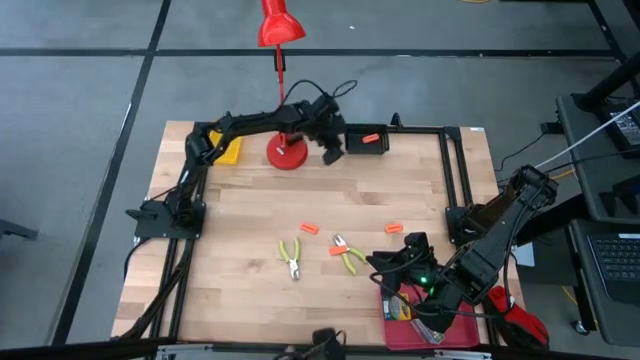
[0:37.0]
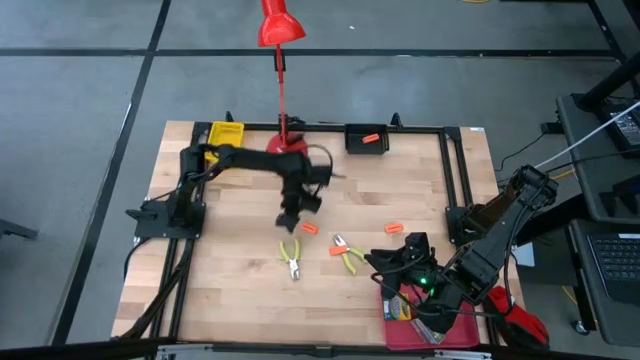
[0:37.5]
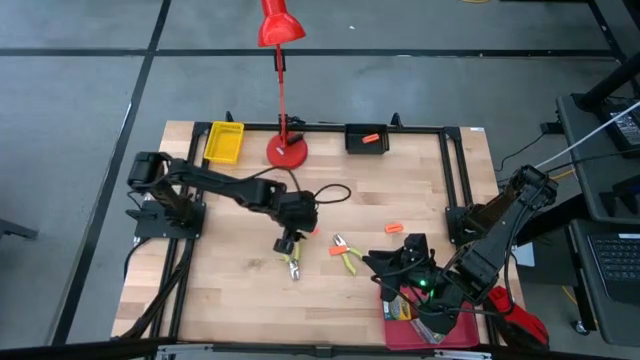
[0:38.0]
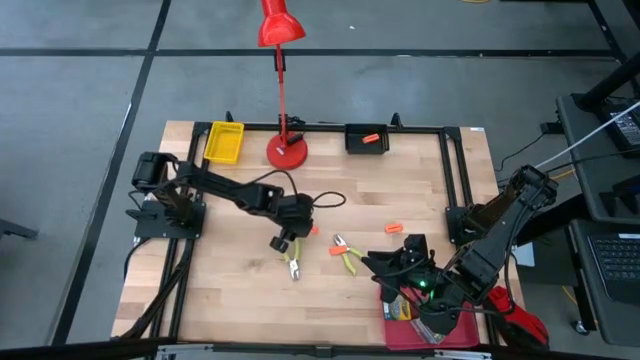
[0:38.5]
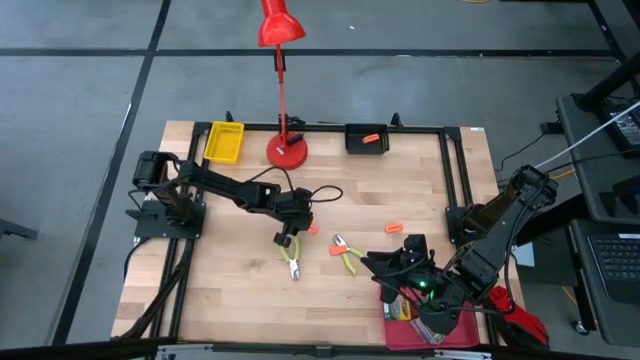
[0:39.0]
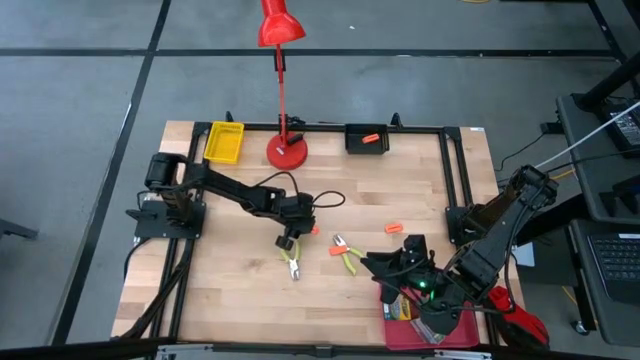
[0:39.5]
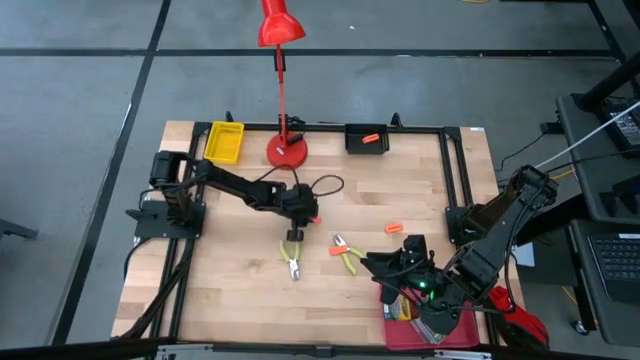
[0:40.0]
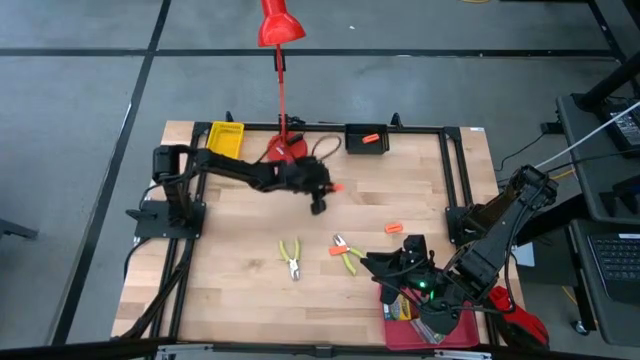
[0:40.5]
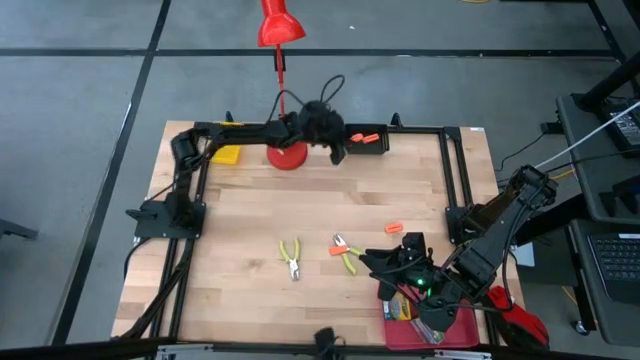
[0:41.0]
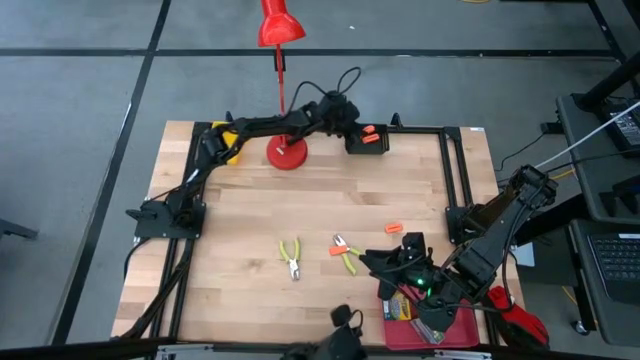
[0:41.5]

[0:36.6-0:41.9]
Task: Pick & Place School Supplies
Put the orange eraser into the black bin

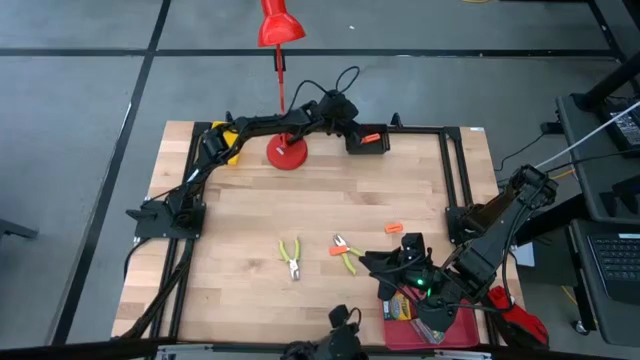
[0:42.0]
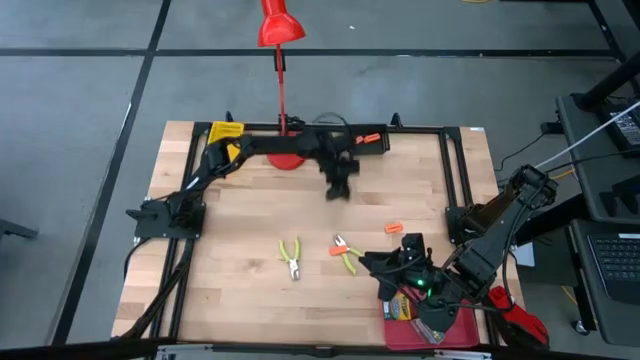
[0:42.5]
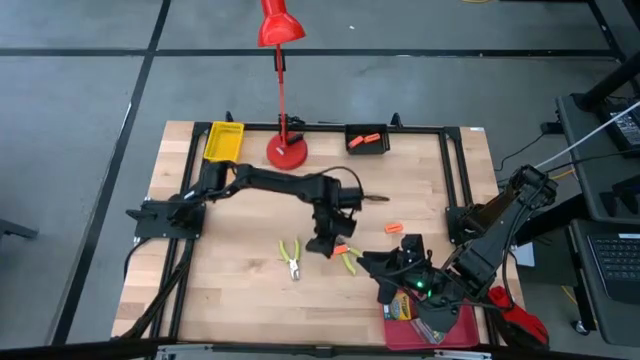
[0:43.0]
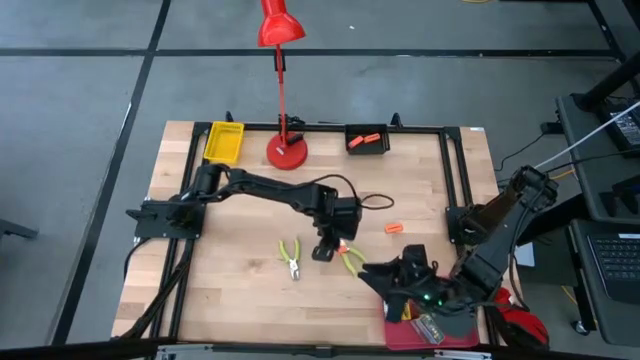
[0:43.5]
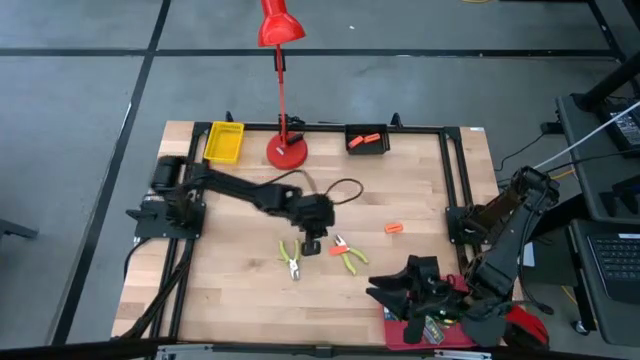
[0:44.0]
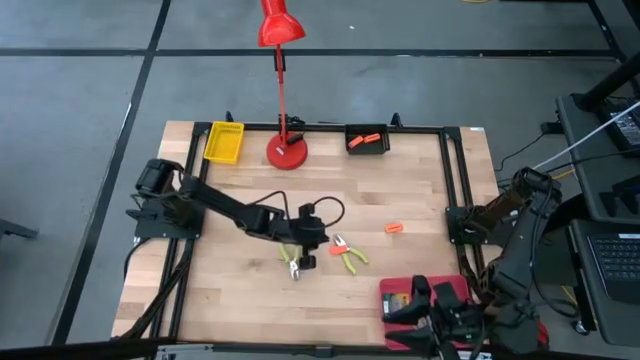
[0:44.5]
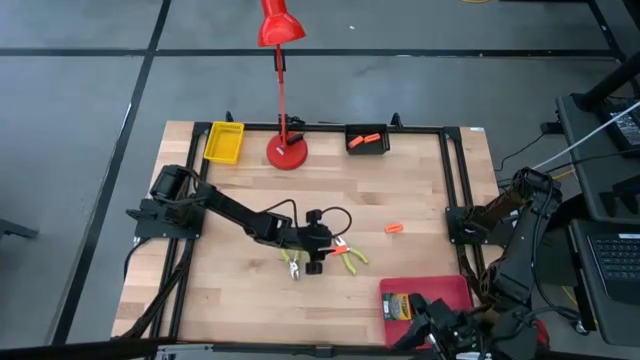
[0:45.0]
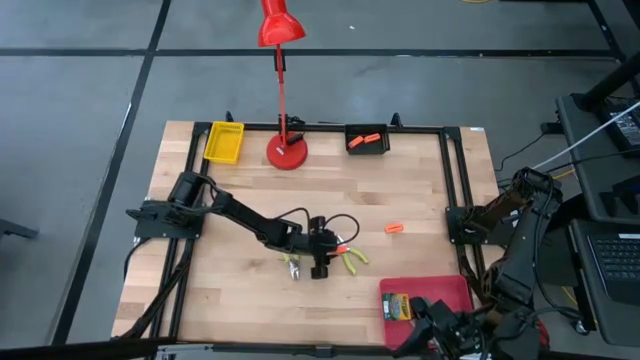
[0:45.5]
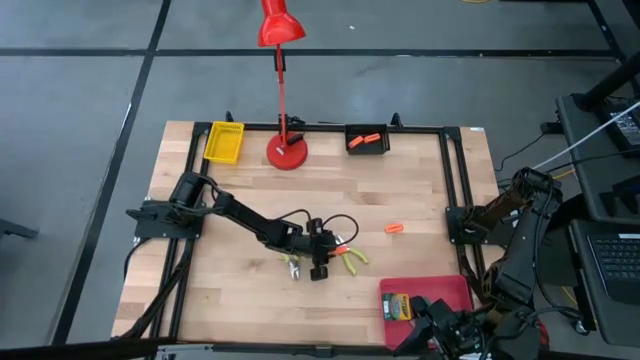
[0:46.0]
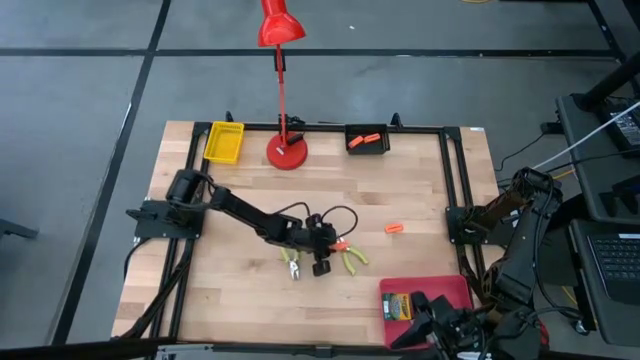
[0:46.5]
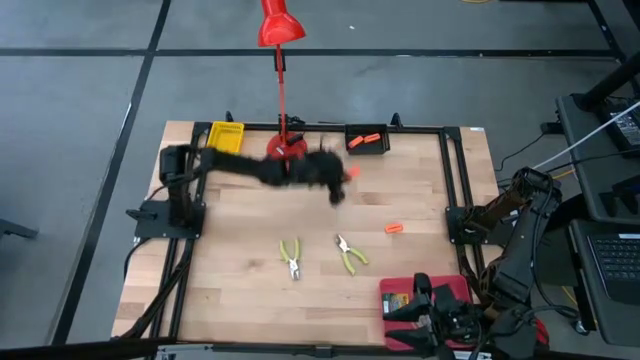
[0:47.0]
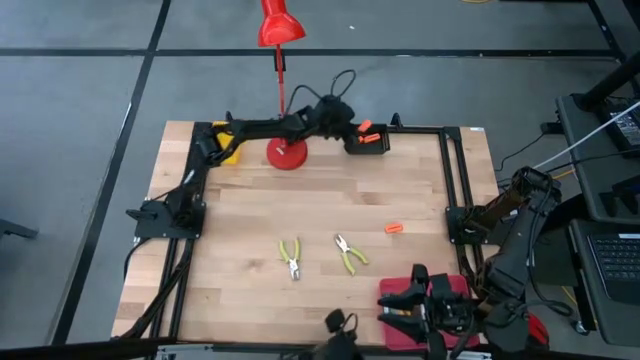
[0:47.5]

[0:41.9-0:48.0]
Put the orange eraser into the black bin

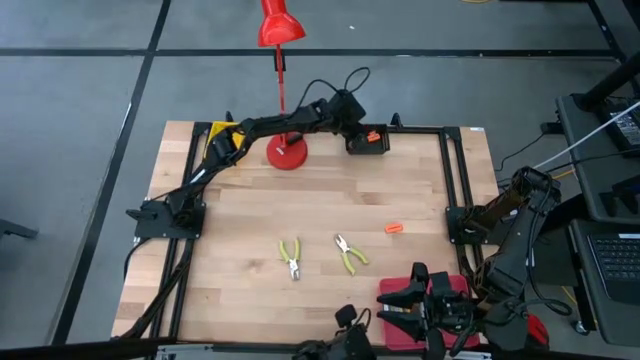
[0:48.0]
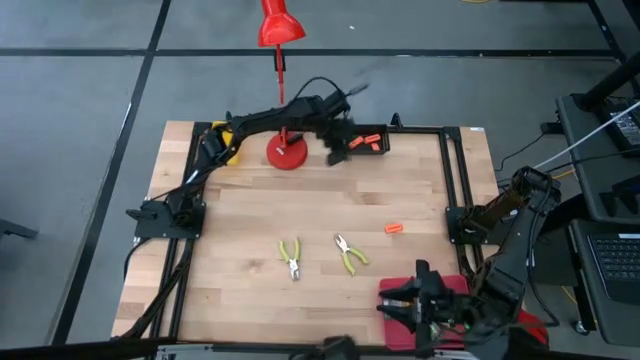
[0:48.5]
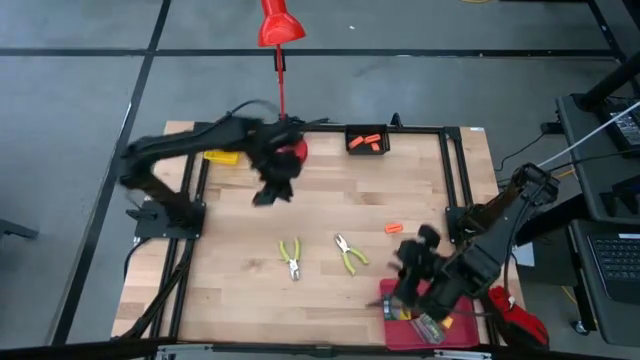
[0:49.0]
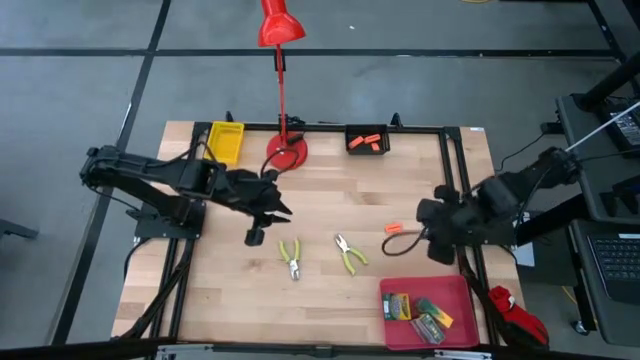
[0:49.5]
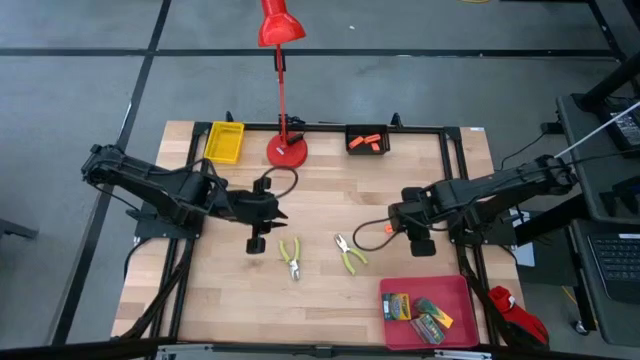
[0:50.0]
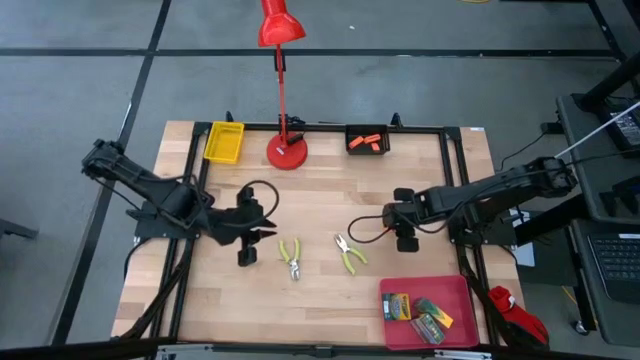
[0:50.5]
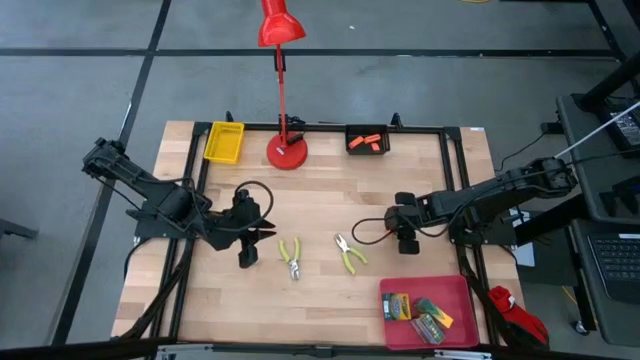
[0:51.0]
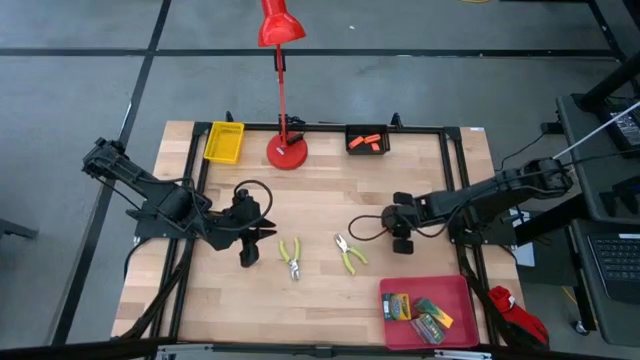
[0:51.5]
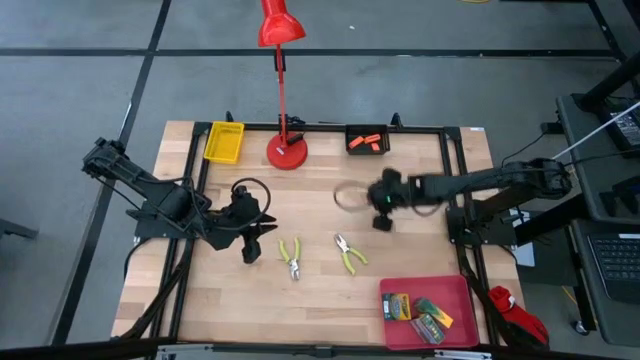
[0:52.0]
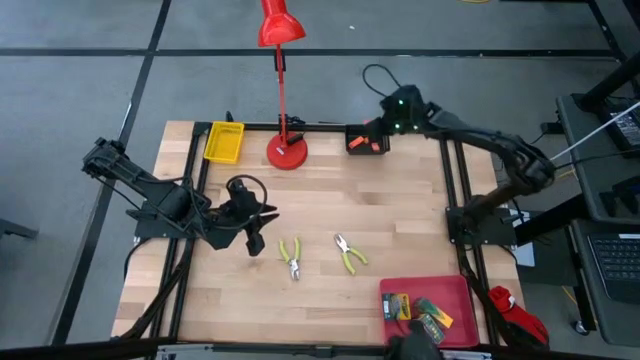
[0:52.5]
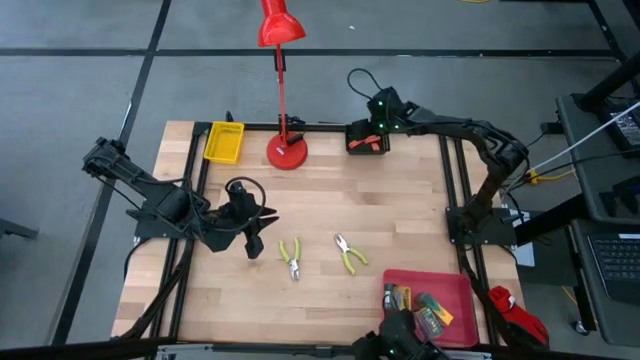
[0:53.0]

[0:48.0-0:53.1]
Put the orange eraser into the black bin

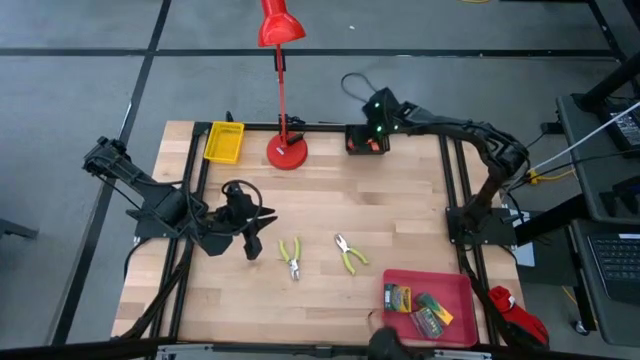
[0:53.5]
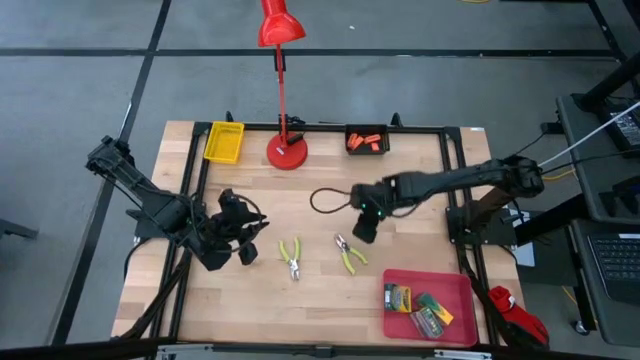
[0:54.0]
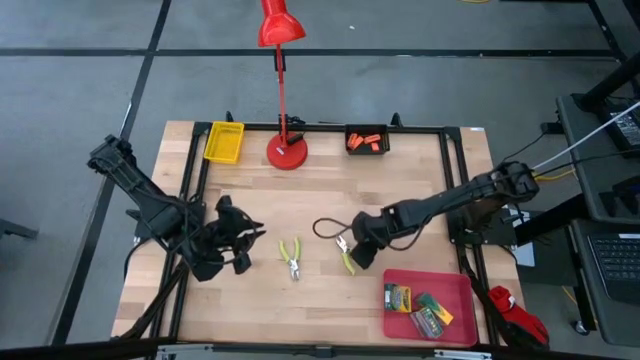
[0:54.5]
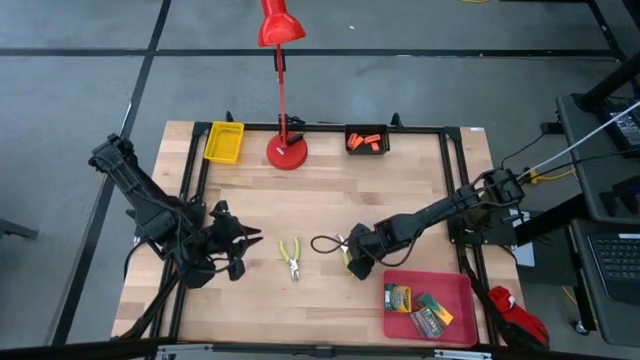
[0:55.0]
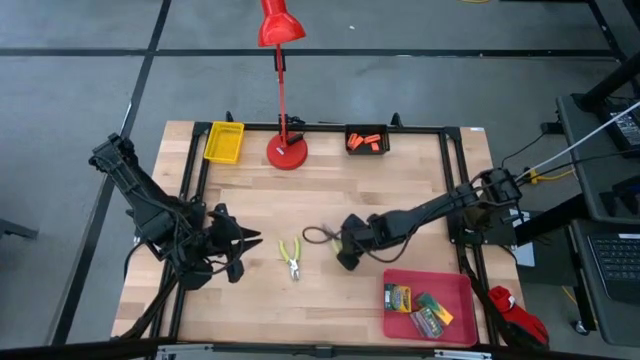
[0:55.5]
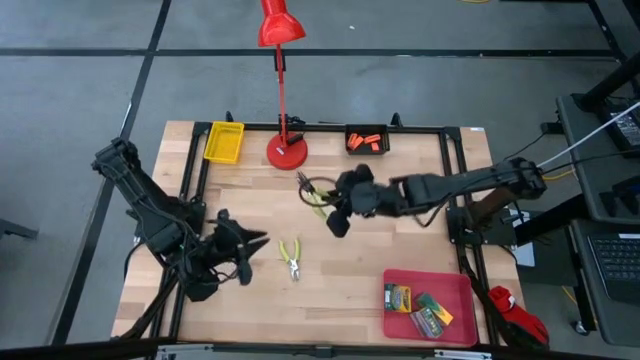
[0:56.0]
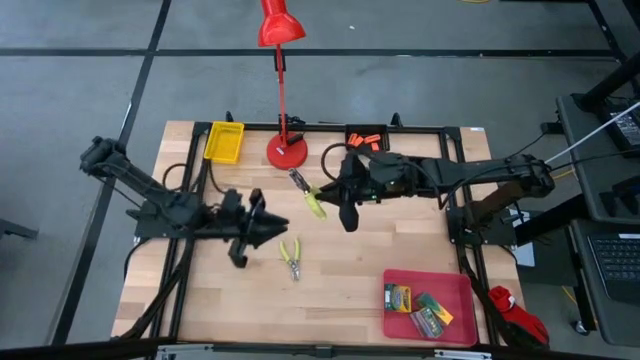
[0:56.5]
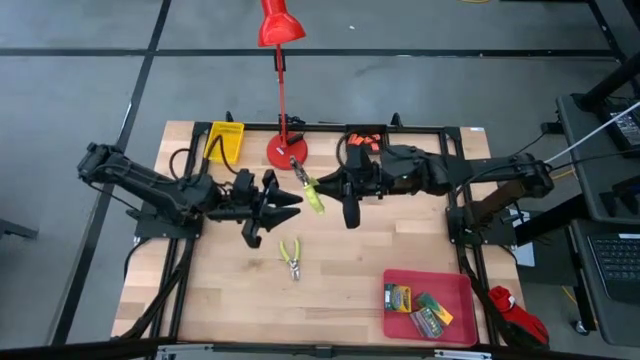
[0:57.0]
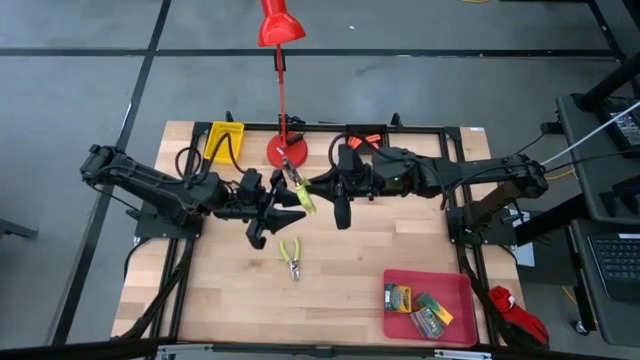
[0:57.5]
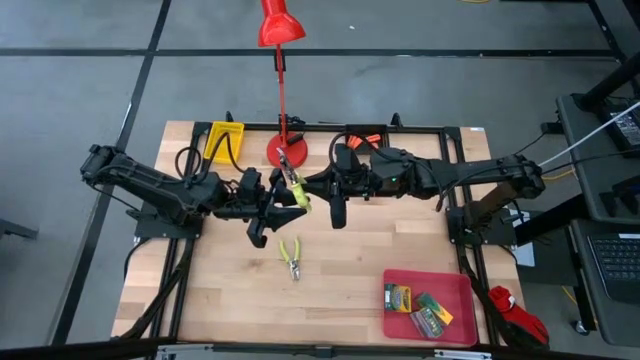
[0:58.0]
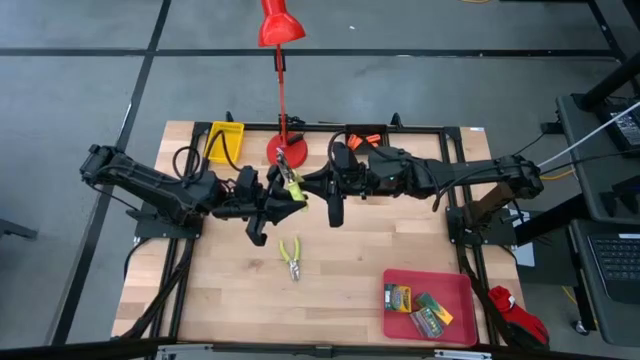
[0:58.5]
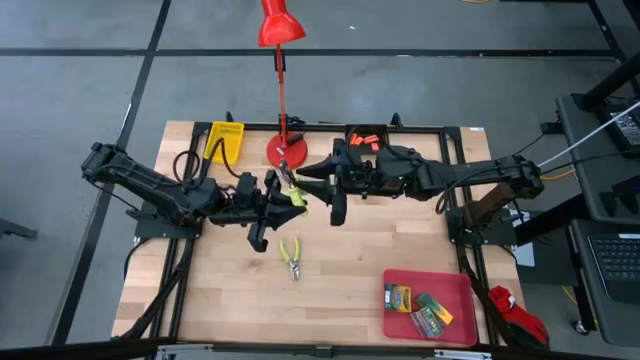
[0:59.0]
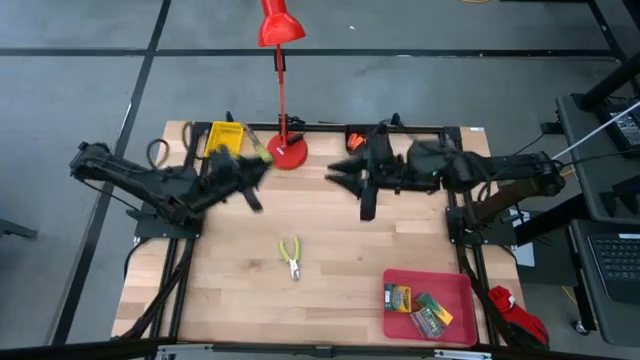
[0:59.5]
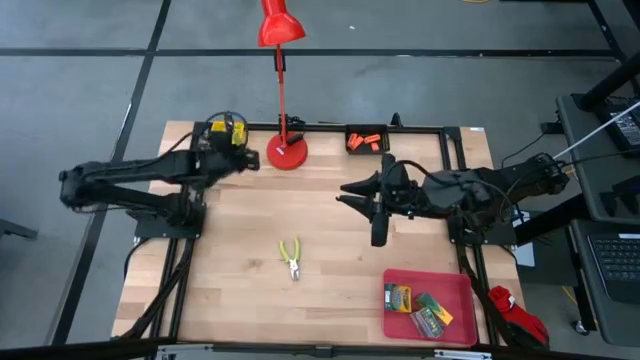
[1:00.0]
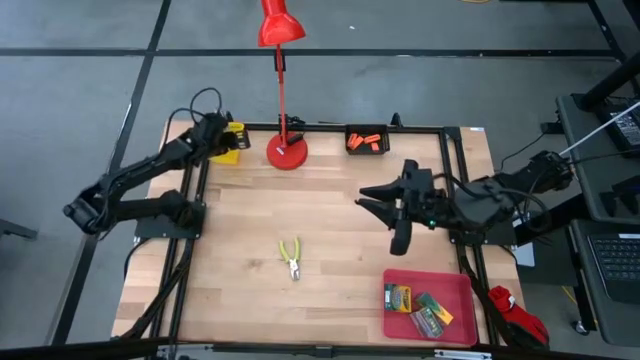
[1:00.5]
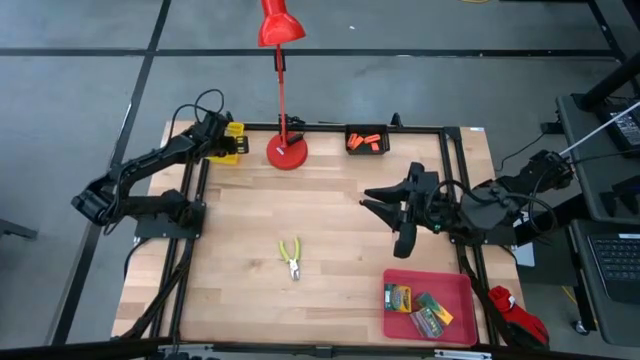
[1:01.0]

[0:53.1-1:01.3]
Put the green hole punch into the yellow bin
